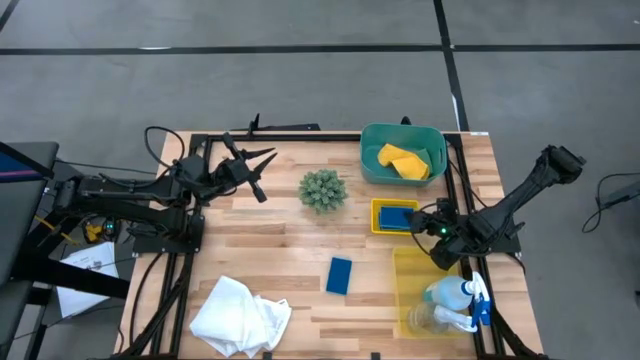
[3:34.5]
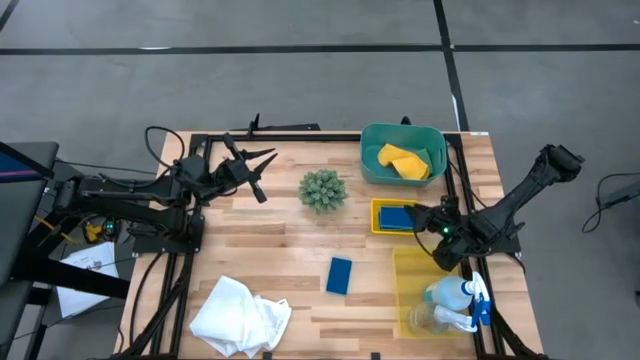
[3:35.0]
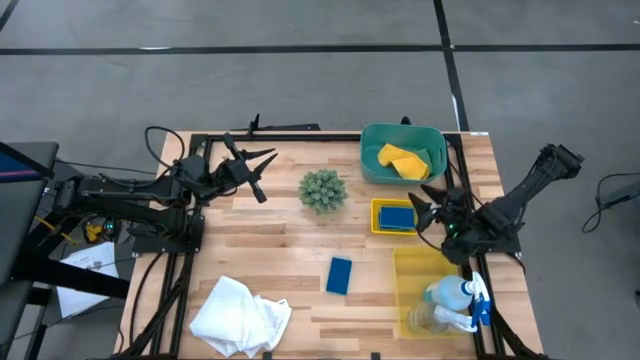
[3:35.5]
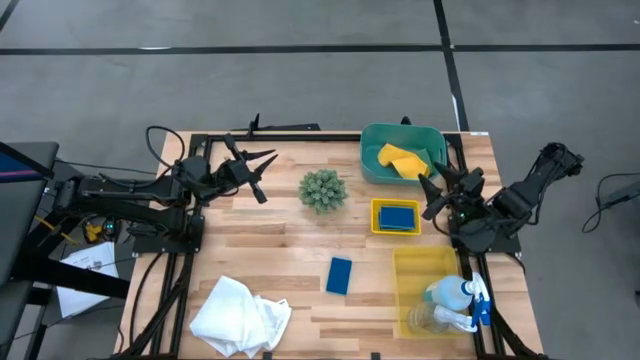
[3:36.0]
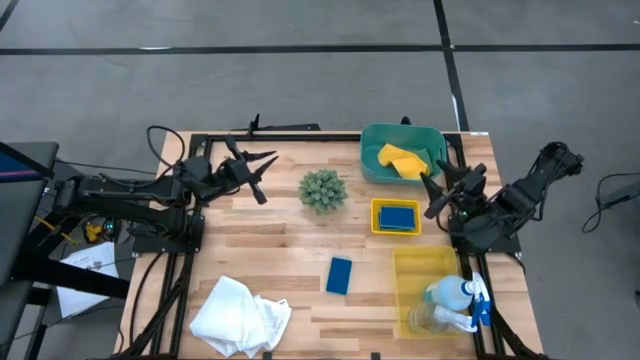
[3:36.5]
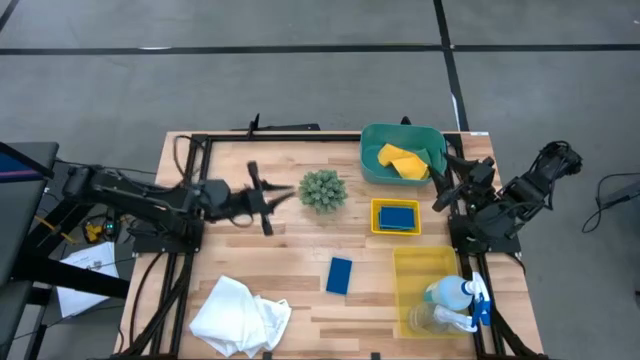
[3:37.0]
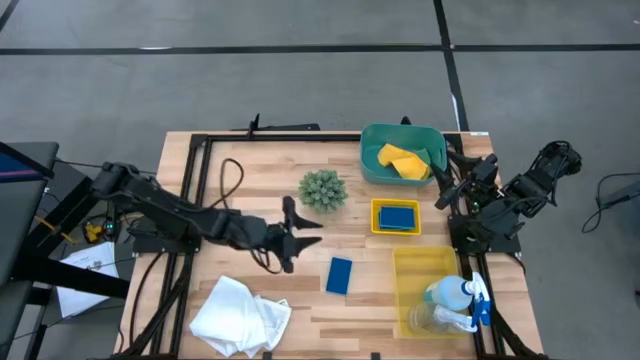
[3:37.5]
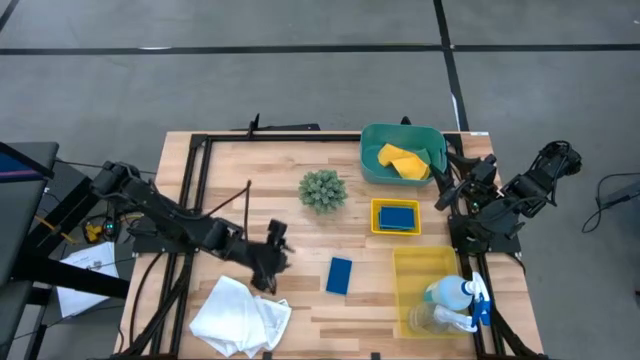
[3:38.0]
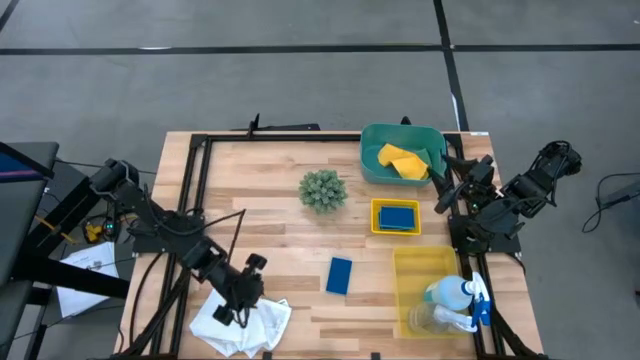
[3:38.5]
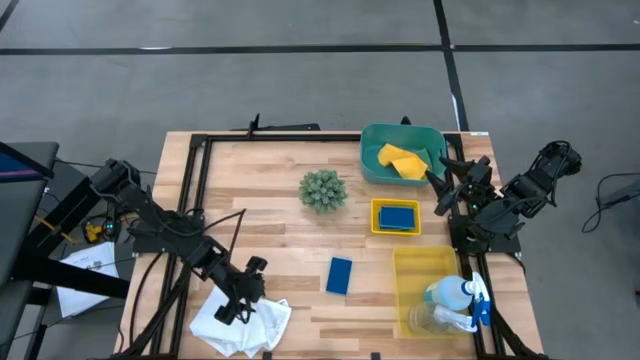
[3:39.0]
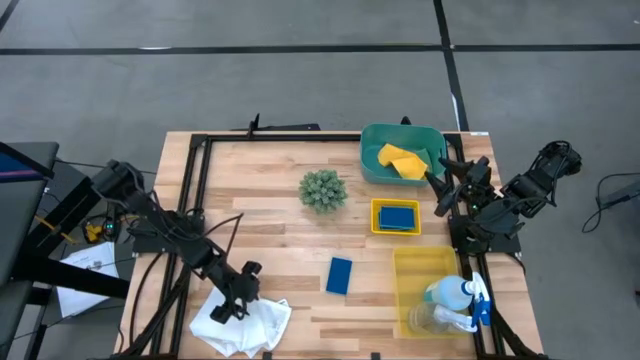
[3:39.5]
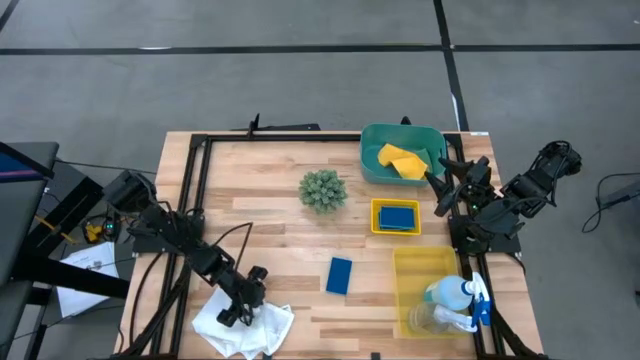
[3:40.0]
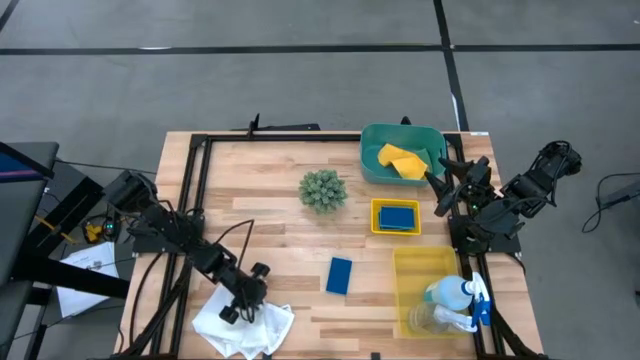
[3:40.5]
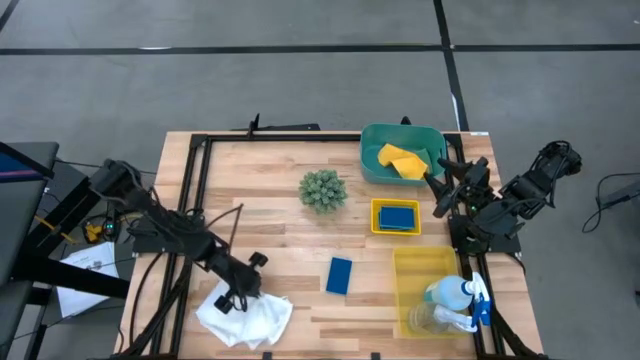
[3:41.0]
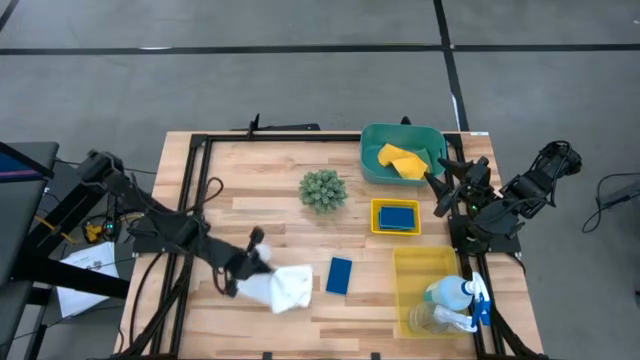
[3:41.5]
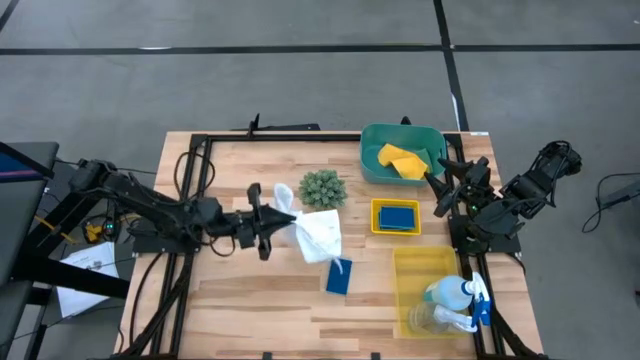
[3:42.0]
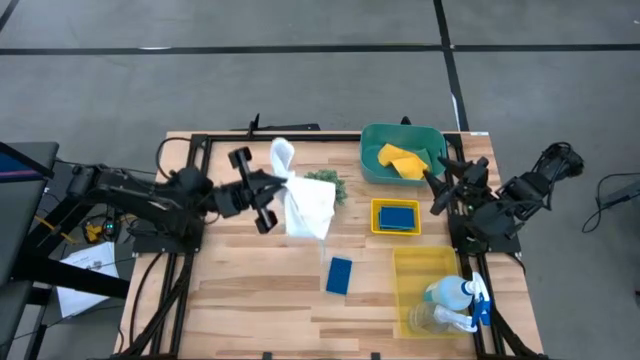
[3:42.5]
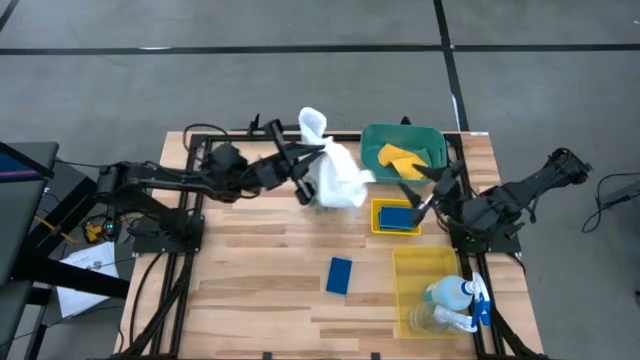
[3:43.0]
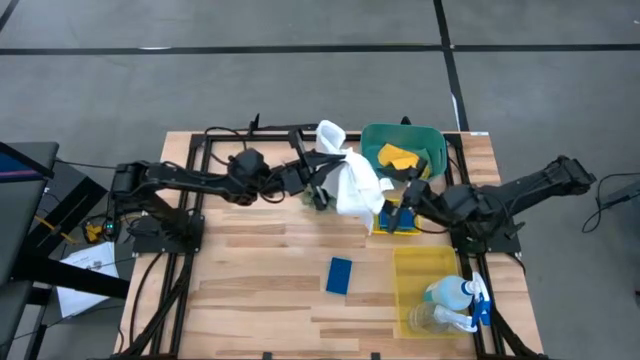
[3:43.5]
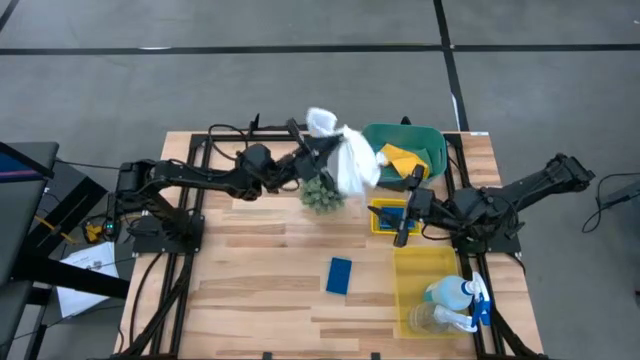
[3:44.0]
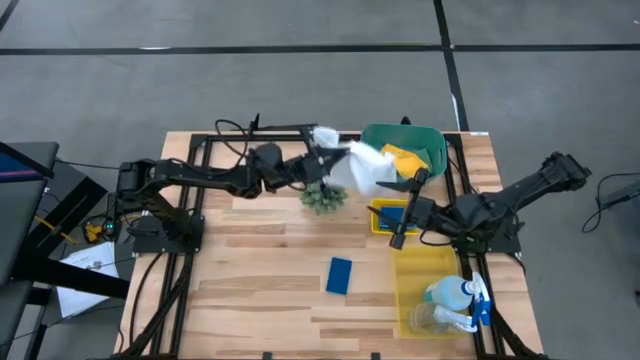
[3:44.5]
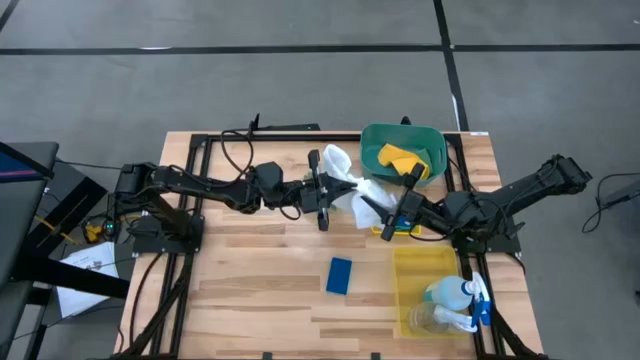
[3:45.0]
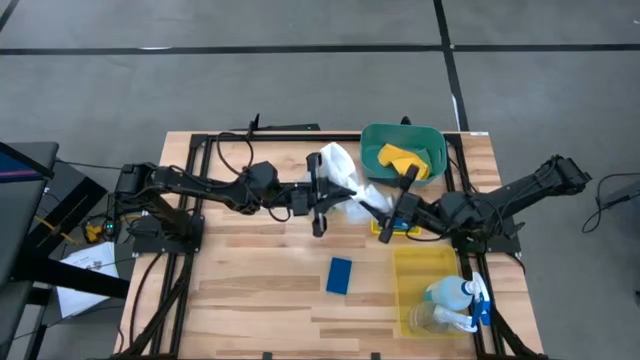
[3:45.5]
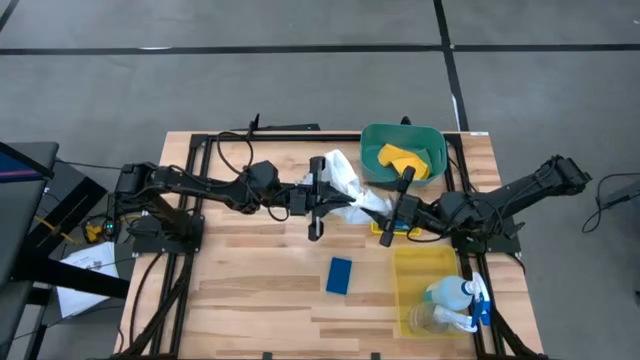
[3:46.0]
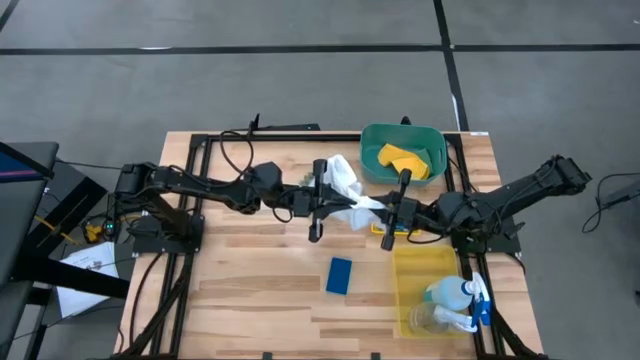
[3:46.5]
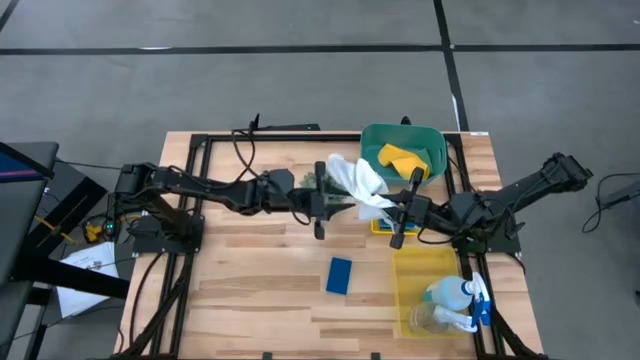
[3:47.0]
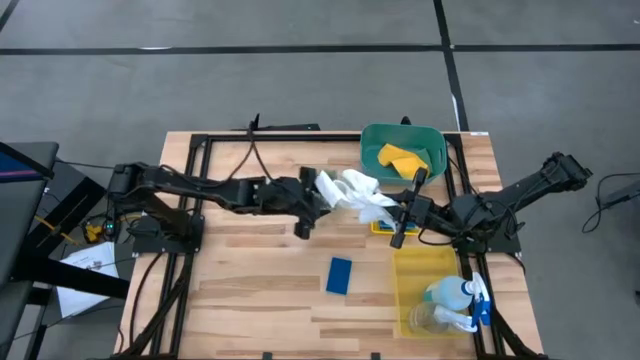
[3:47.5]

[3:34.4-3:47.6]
Task: Pick & Place Kitchen Items
Put the white towel into the green bin

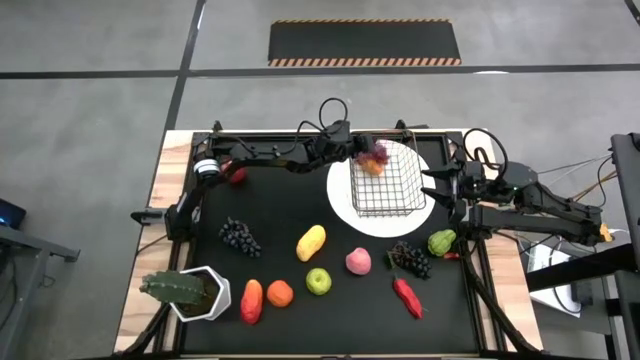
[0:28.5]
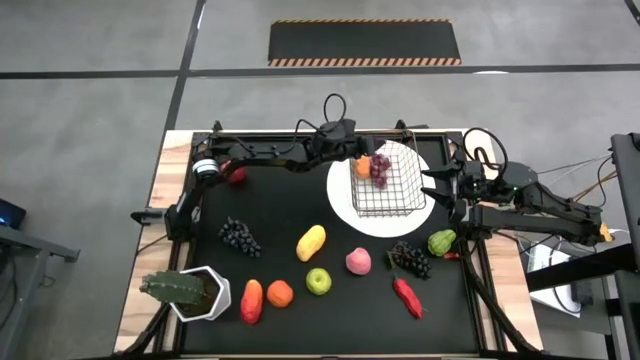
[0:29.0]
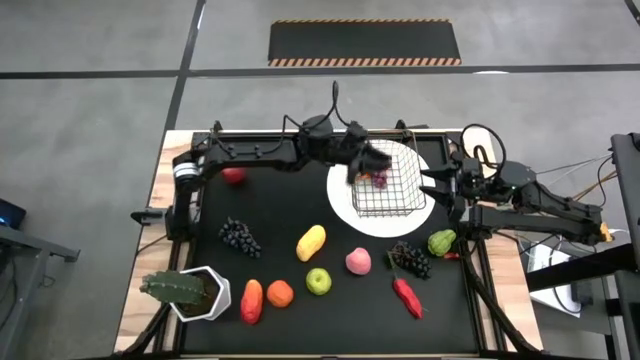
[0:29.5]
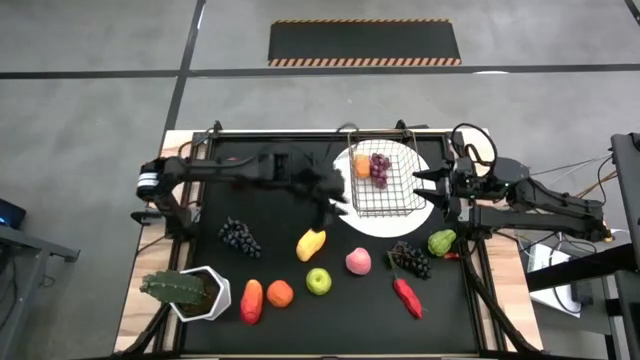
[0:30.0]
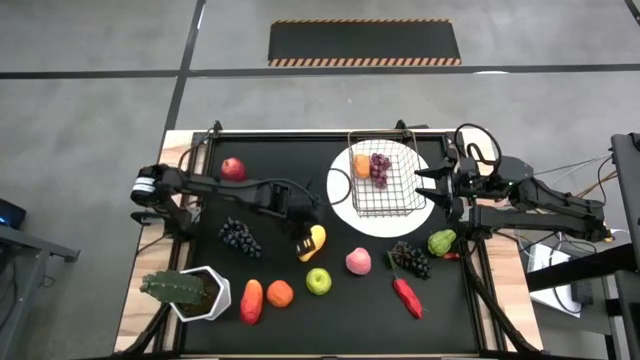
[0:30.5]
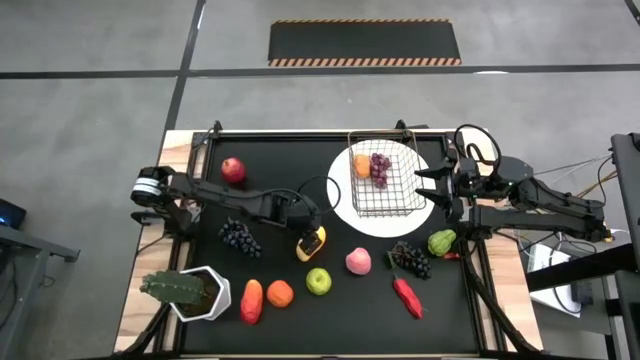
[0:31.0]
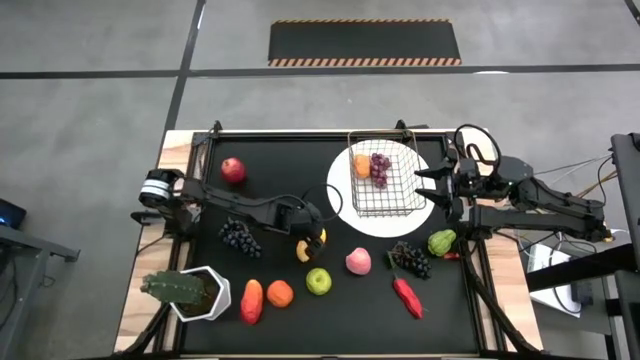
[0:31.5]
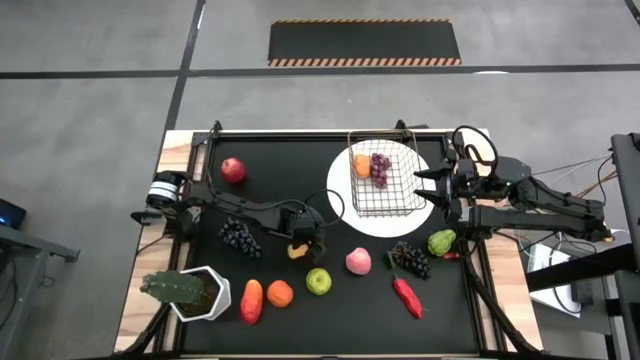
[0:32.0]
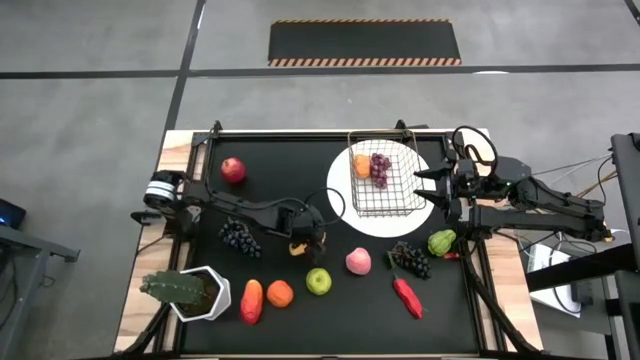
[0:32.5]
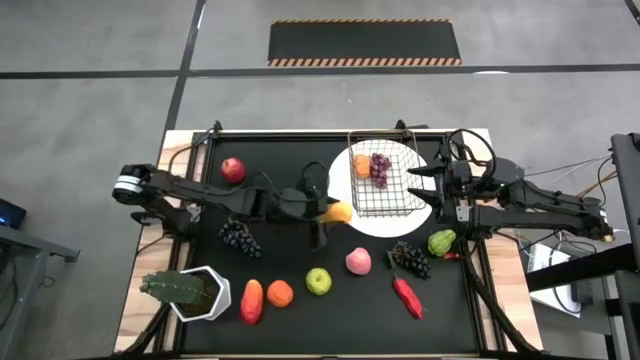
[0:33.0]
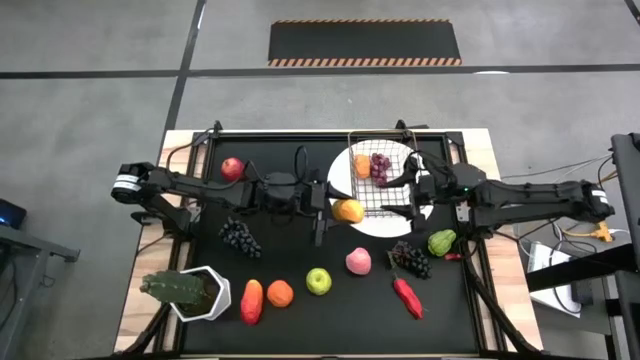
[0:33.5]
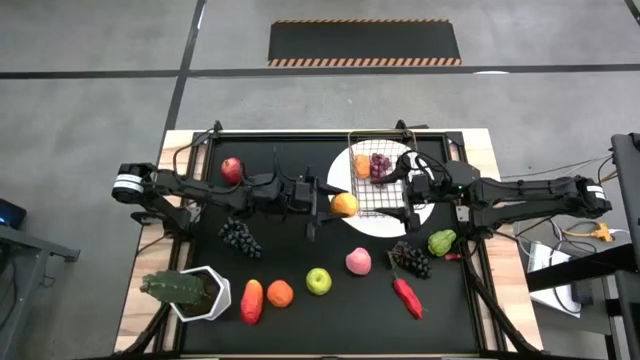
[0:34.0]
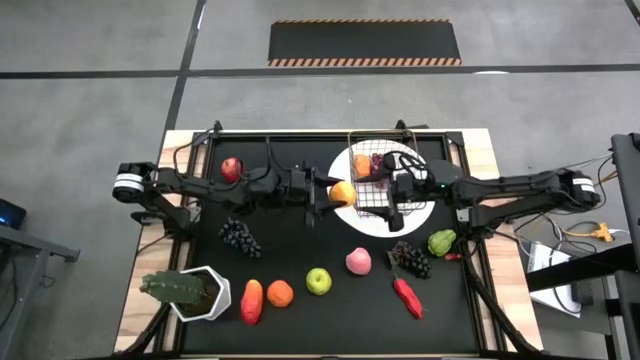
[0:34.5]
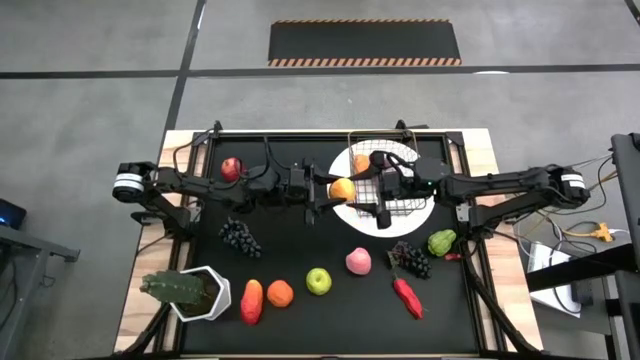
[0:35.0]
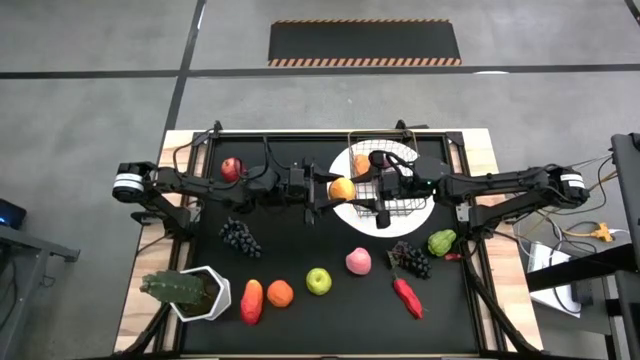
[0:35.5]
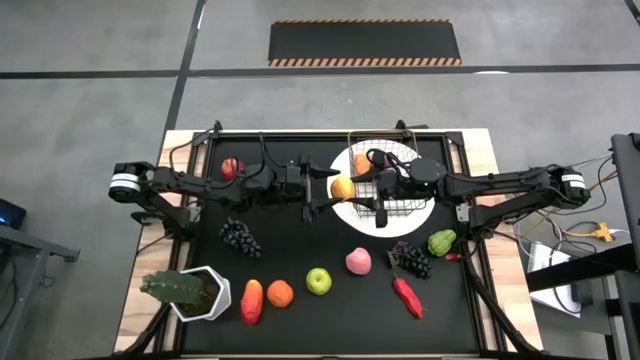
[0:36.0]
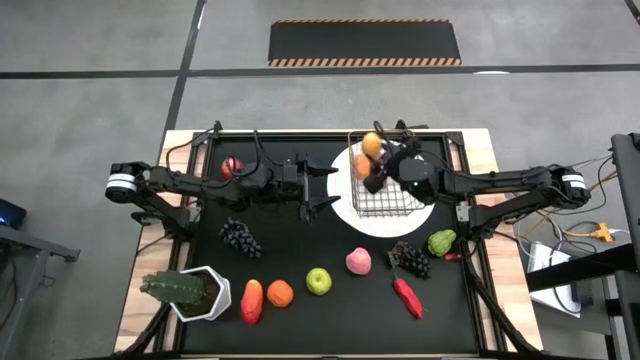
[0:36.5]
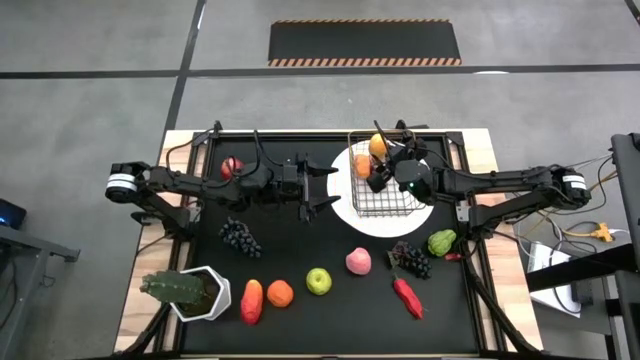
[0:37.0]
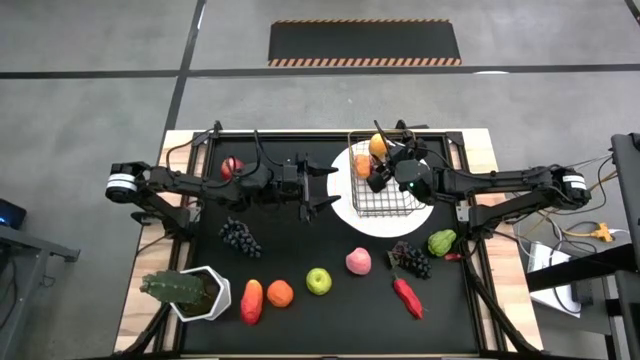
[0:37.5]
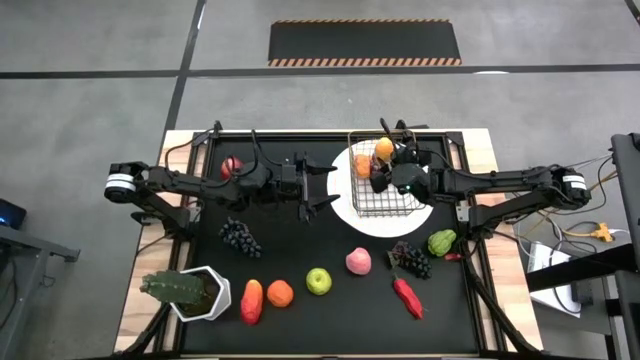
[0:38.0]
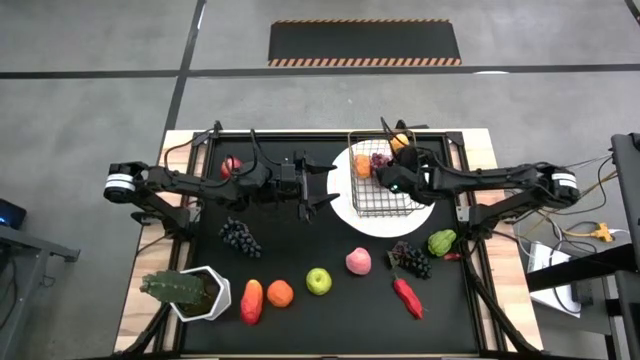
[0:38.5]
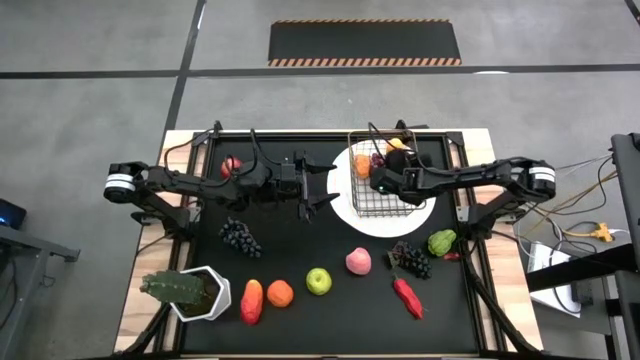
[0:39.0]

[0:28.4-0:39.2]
Task: Build produce basket
Put the yellow mango into the wire basket
